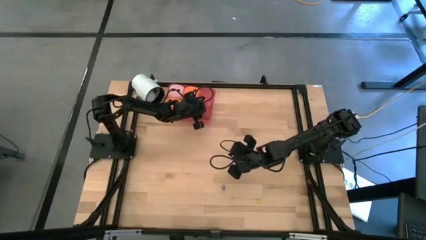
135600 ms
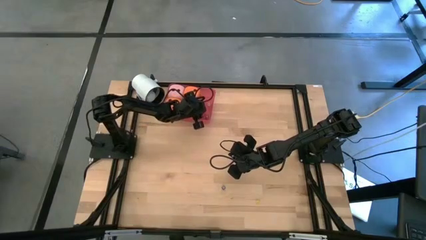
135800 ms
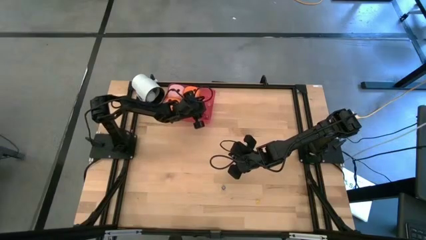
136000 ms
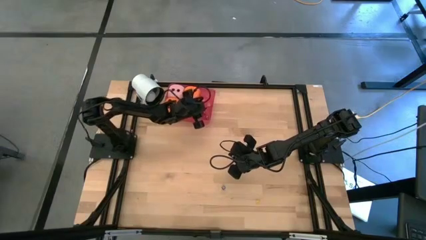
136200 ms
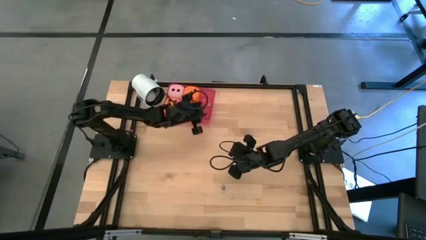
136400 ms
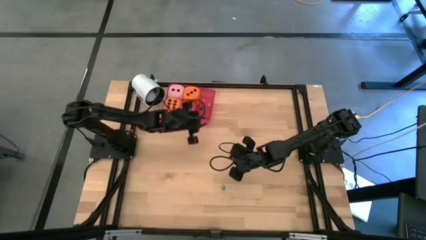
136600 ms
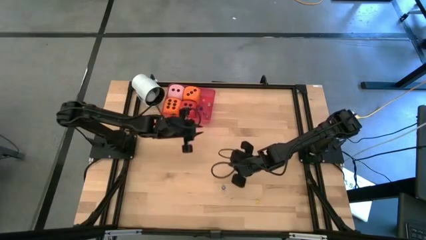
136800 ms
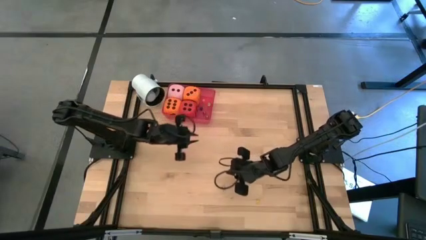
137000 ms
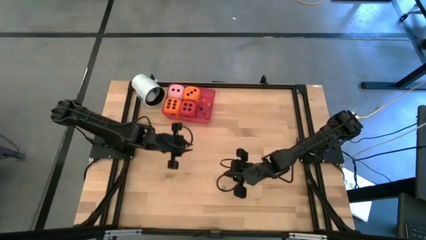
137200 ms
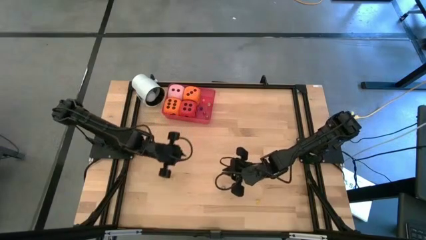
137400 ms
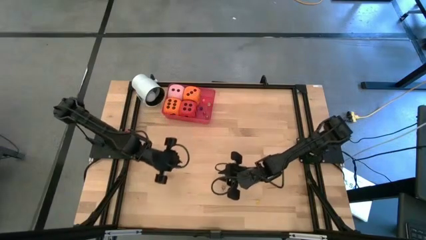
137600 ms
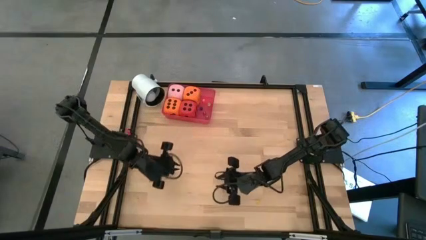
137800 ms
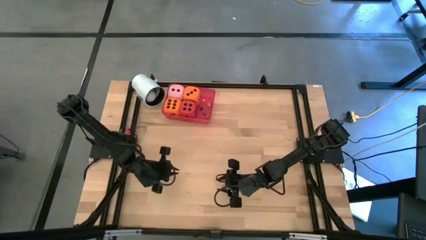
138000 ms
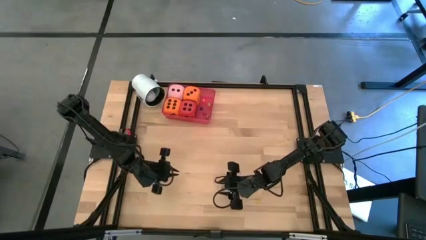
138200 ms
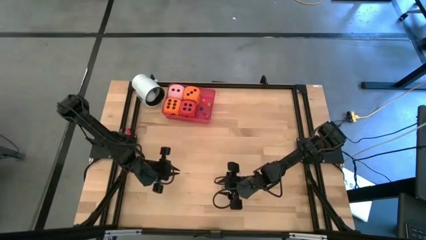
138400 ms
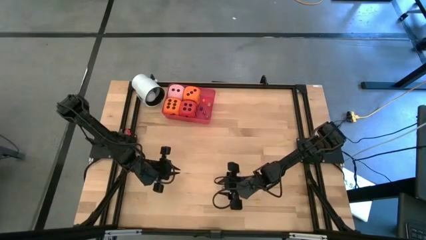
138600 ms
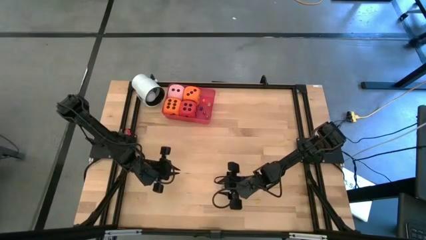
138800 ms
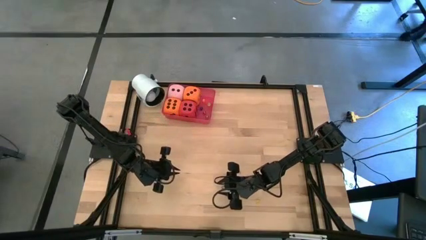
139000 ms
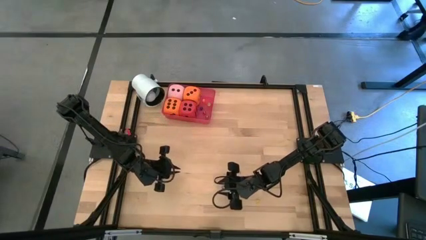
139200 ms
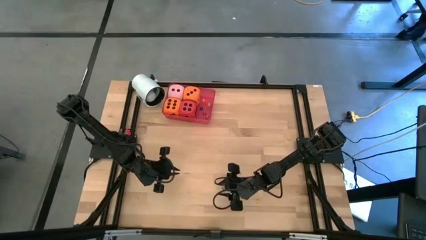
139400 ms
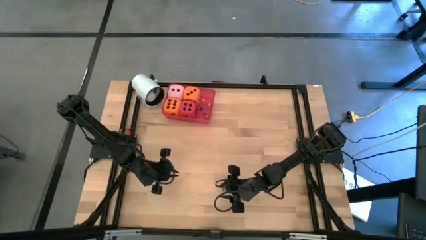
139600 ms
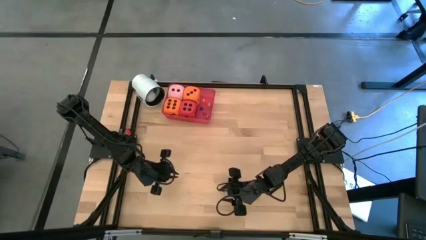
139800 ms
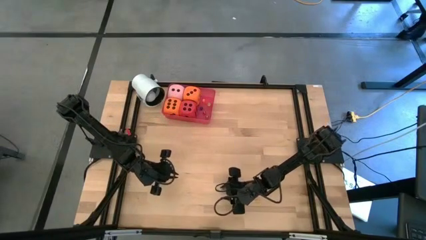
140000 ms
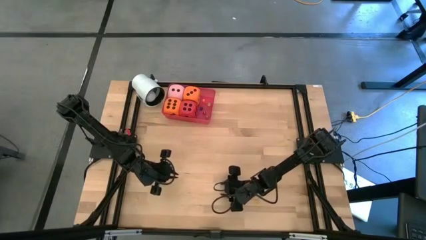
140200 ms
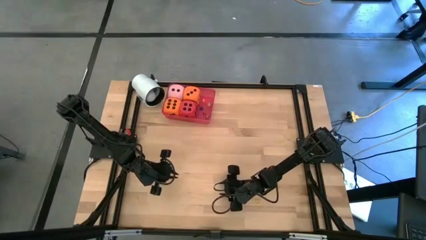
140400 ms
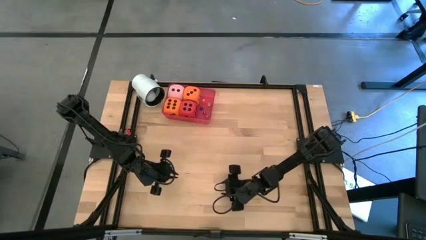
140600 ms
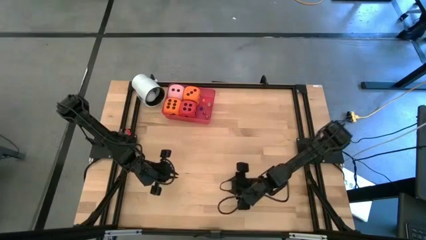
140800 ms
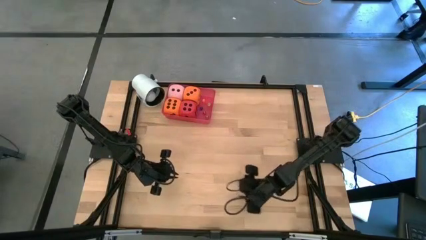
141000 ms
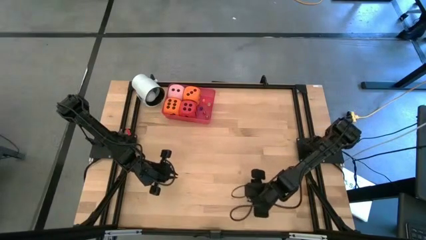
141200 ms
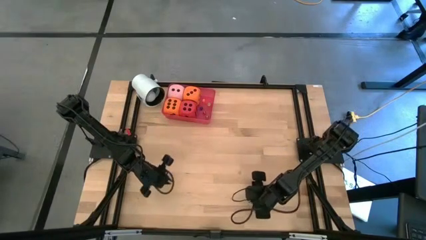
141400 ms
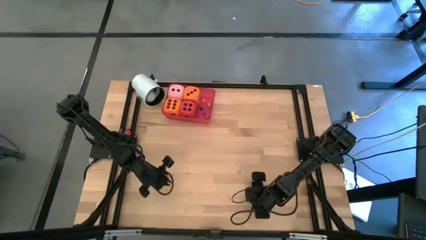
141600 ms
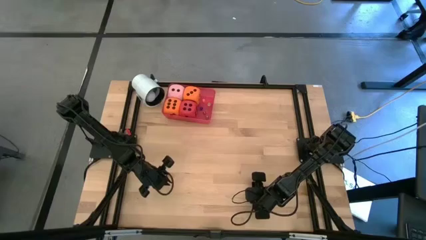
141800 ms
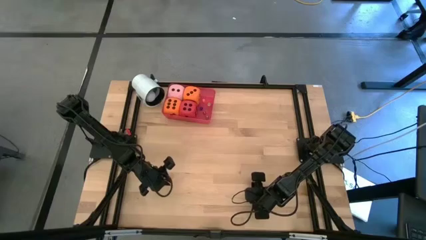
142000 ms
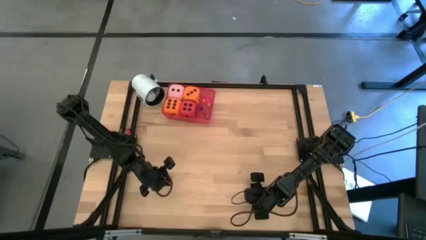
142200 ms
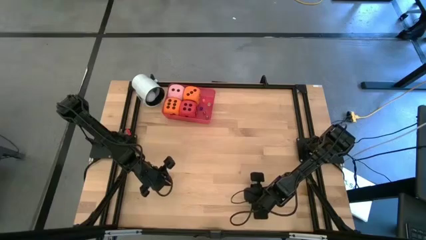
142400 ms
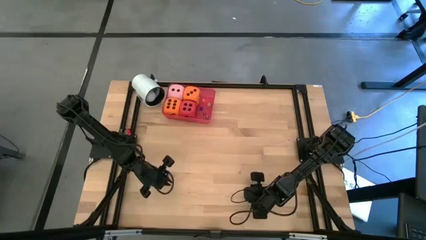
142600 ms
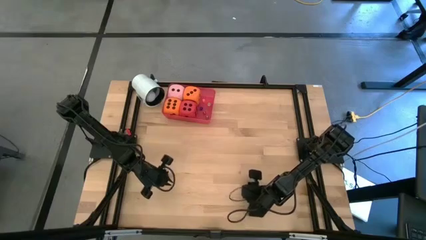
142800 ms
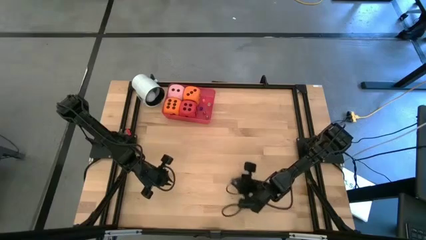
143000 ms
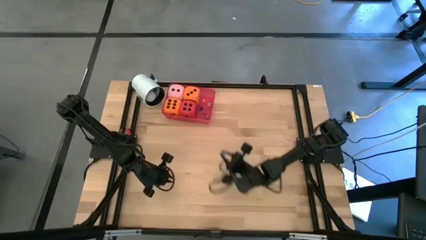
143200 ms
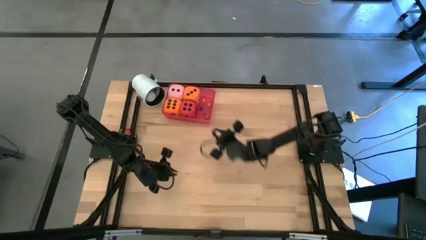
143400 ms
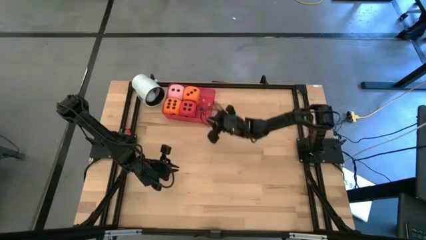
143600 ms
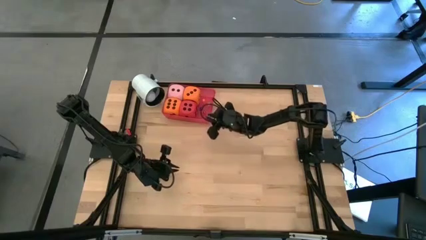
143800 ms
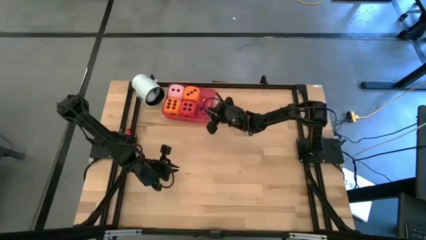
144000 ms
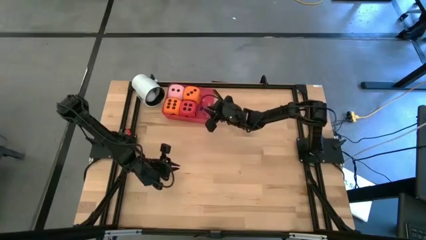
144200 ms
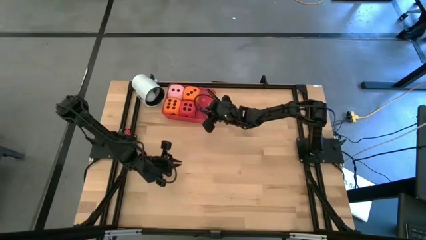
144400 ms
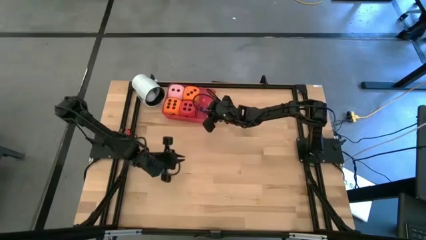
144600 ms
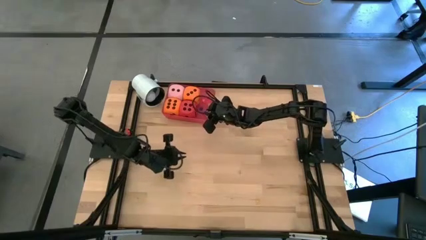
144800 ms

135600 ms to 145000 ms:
Task: Pick & Place Dice
Put the small blue die into the red bin
